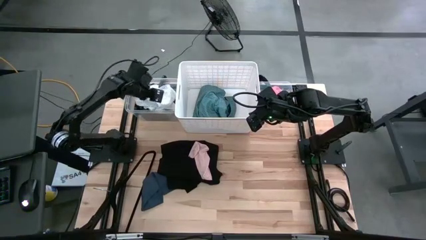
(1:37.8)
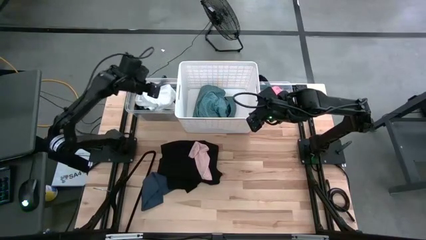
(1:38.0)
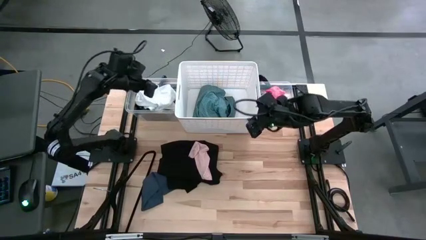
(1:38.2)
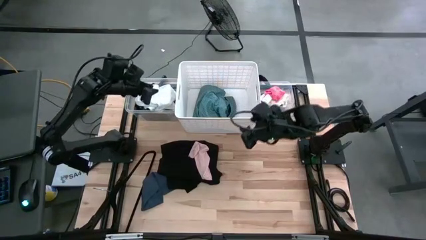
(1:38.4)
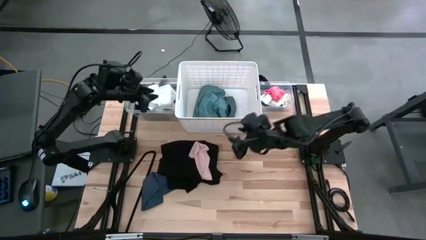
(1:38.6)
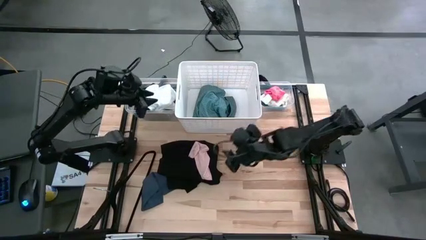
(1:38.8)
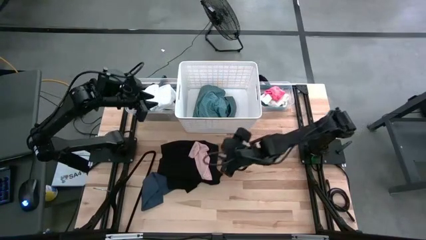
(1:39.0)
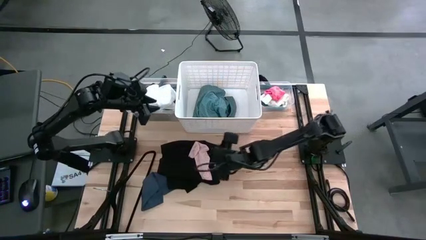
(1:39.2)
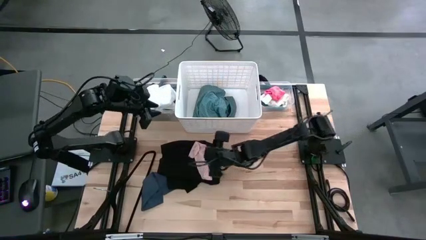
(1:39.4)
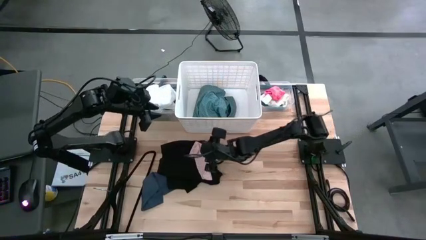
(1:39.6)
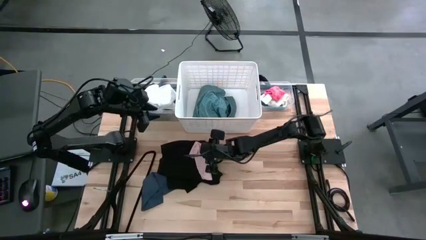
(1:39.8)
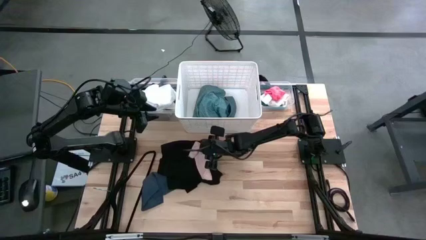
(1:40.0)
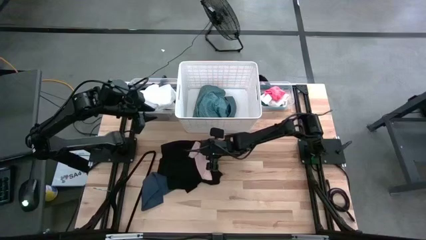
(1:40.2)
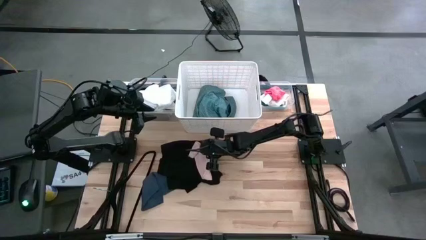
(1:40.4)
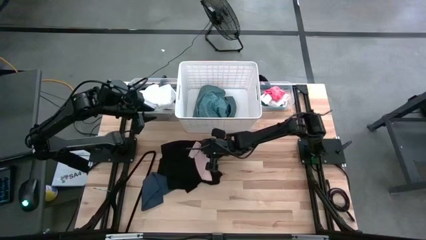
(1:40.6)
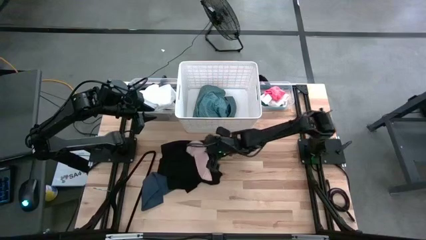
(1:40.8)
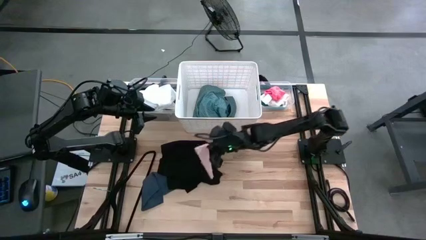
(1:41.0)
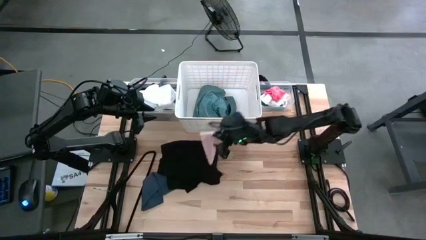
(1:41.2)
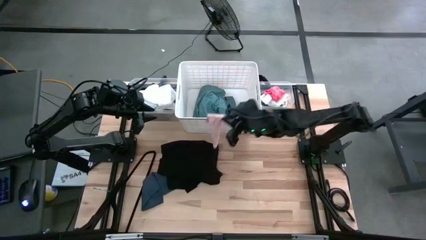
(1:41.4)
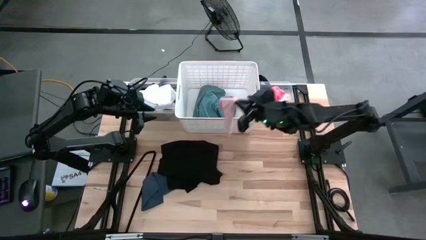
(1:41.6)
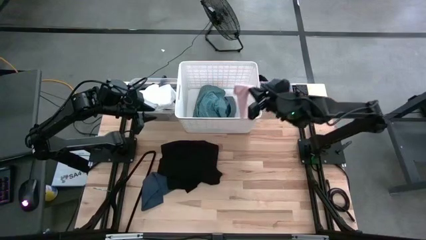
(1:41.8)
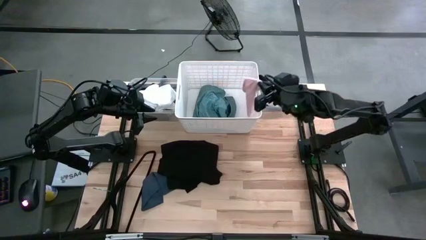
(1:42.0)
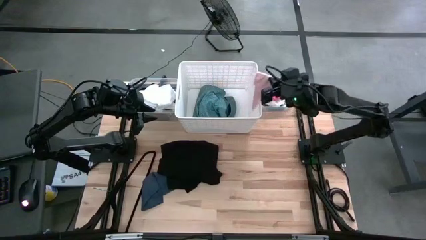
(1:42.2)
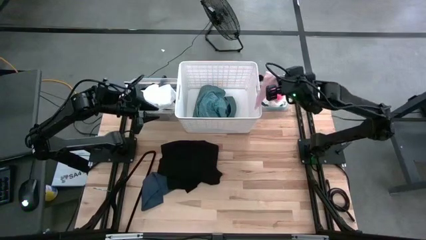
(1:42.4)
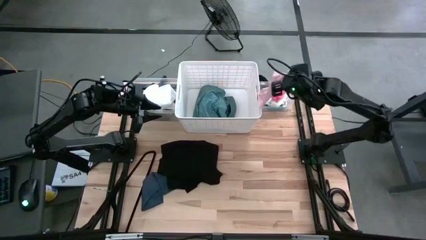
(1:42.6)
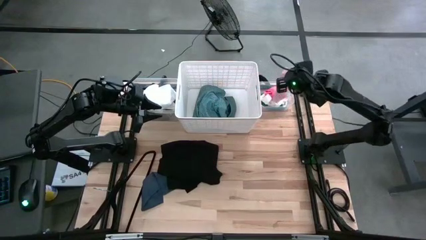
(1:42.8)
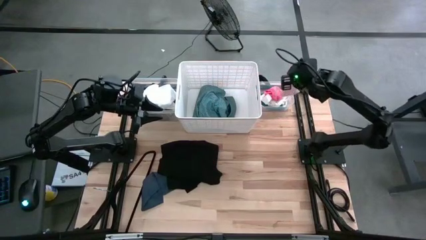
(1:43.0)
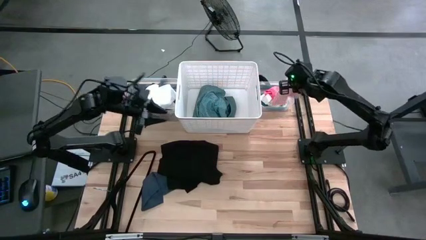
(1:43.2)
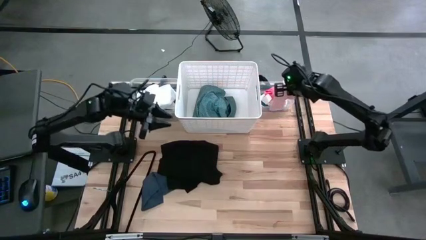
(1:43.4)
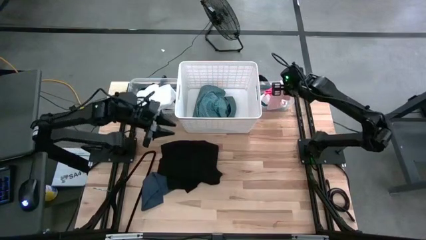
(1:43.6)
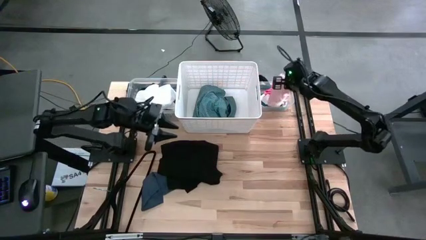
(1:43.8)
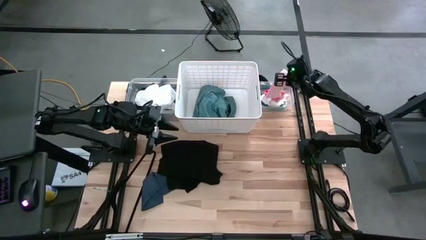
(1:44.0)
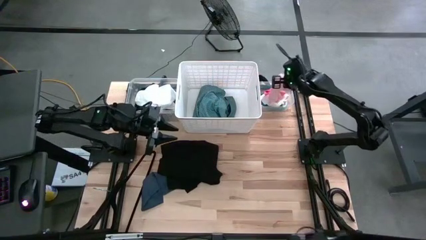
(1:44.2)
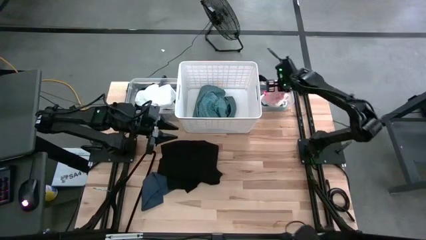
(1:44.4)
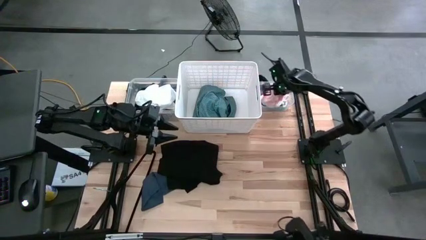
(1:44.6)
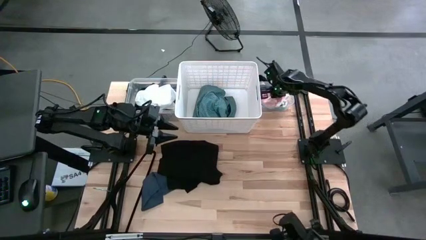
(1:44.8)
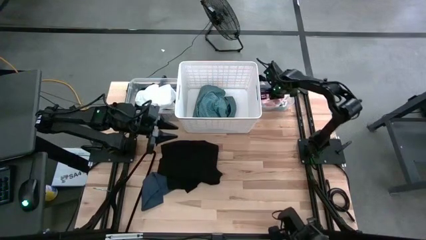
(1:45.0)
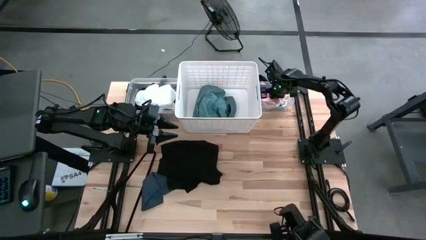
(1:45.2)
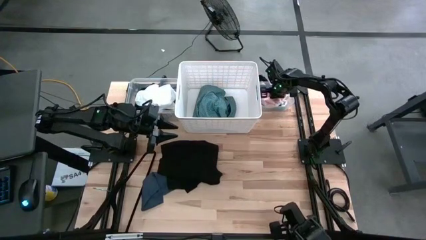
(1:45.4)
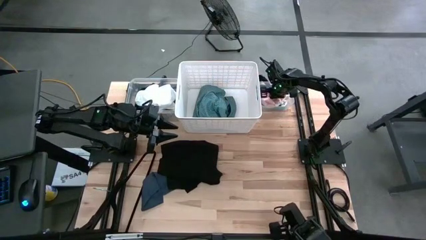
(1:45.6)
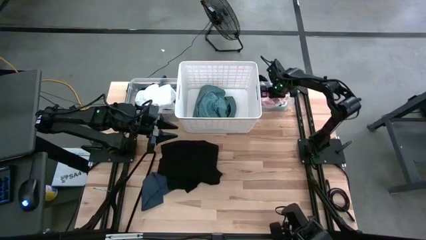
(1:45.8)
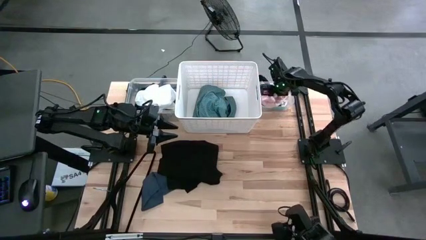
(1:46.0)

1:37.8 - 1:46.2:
Task: Pick & Place Cloths
Put the light pink sock into the right transparent bin

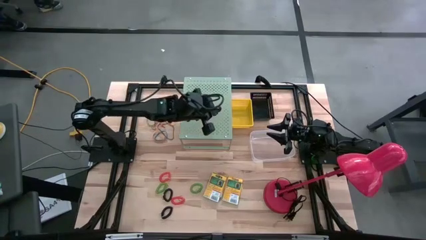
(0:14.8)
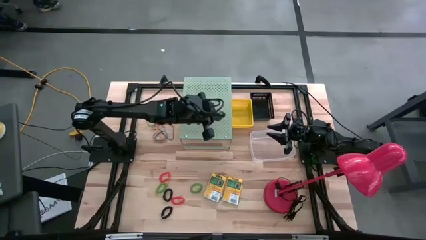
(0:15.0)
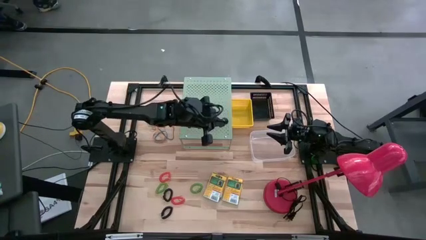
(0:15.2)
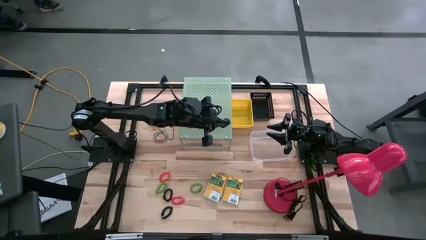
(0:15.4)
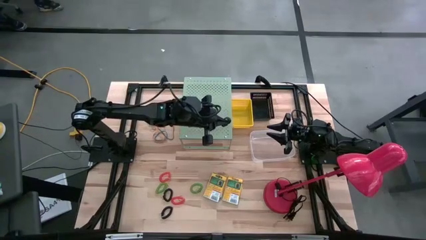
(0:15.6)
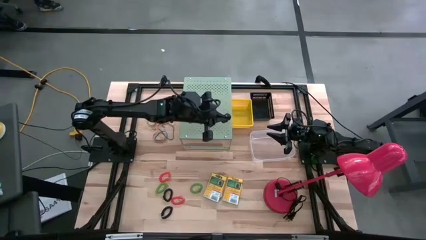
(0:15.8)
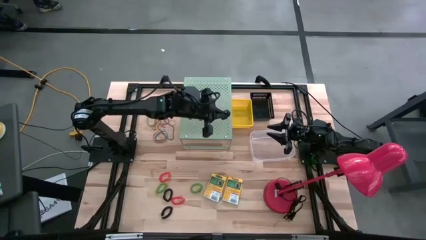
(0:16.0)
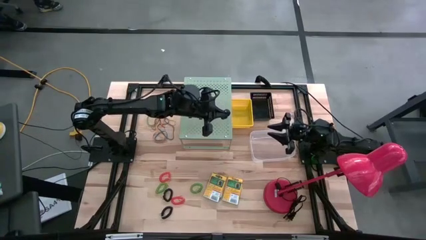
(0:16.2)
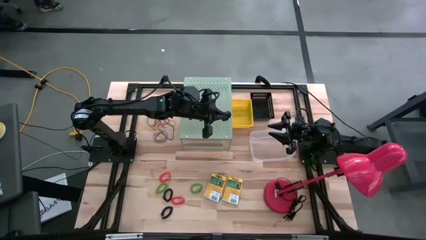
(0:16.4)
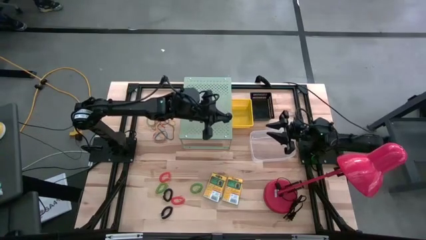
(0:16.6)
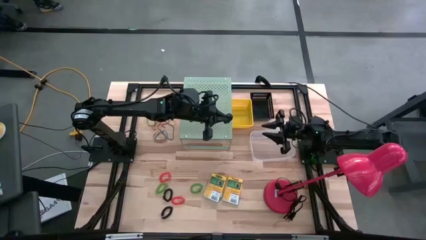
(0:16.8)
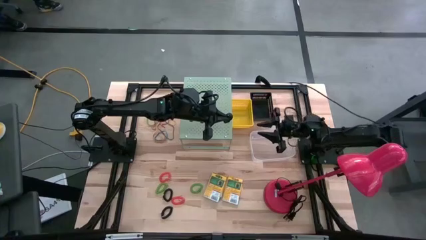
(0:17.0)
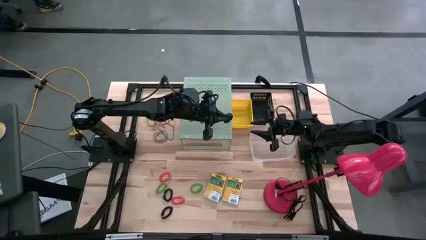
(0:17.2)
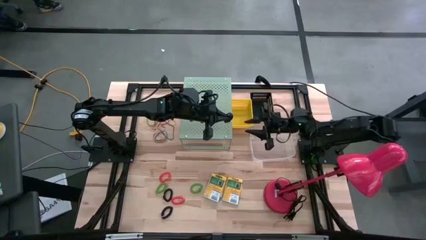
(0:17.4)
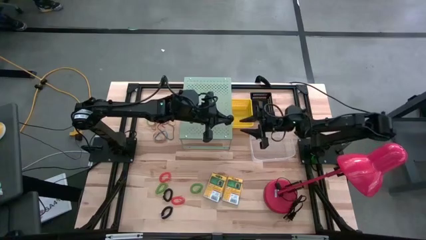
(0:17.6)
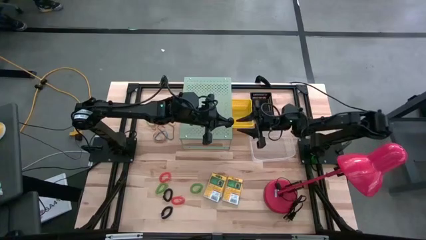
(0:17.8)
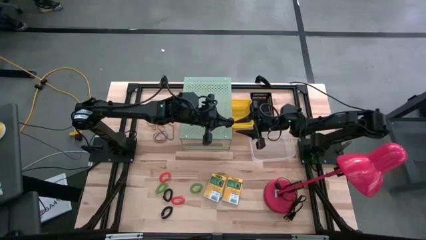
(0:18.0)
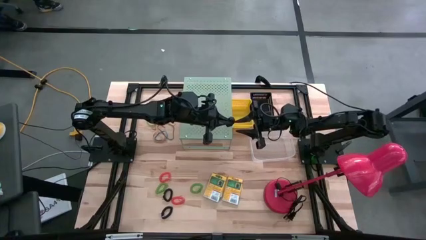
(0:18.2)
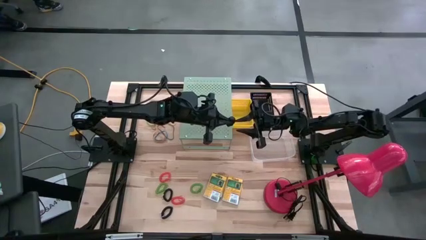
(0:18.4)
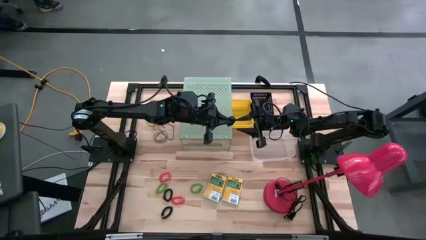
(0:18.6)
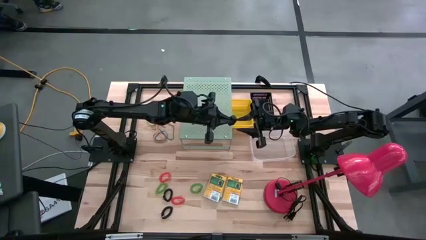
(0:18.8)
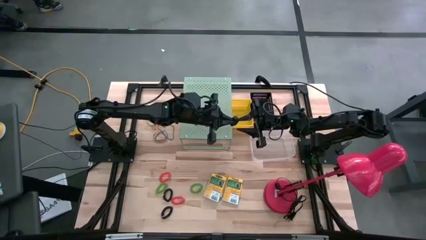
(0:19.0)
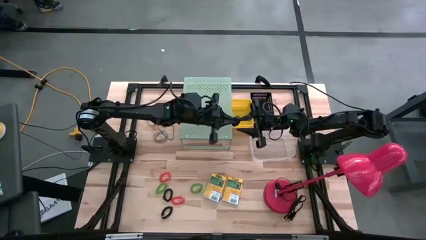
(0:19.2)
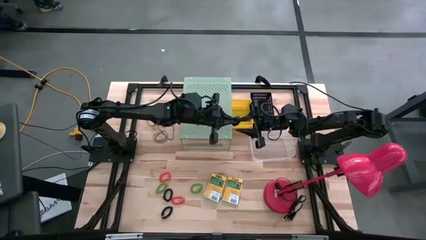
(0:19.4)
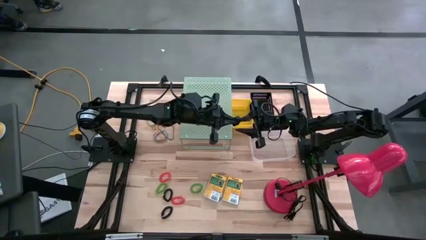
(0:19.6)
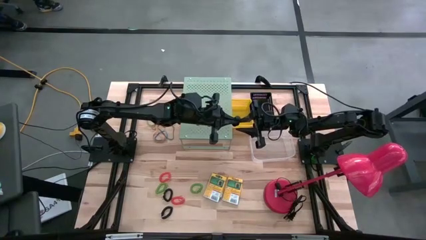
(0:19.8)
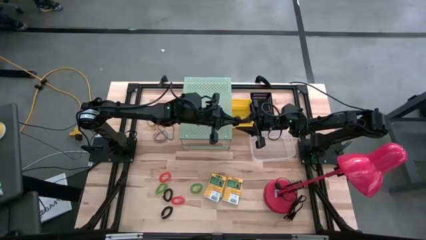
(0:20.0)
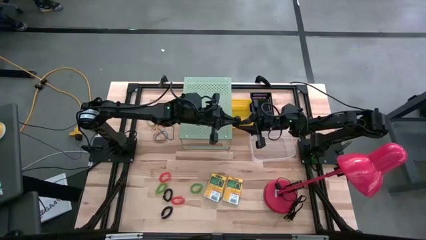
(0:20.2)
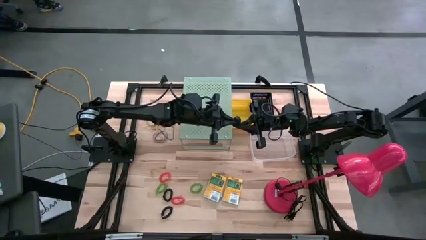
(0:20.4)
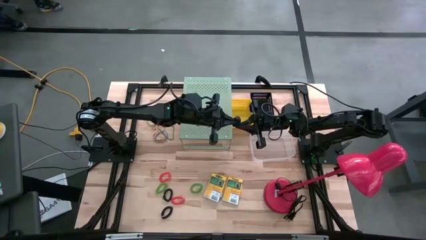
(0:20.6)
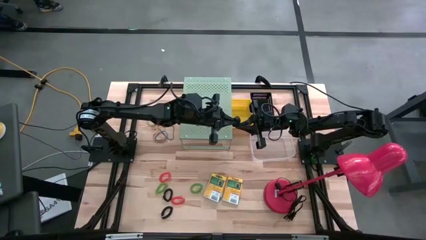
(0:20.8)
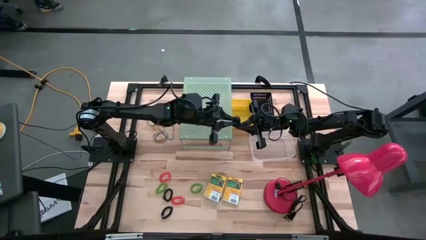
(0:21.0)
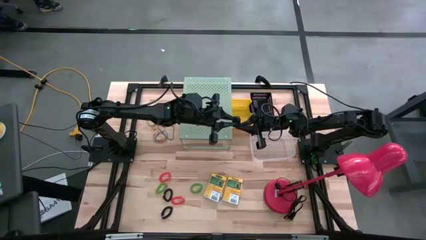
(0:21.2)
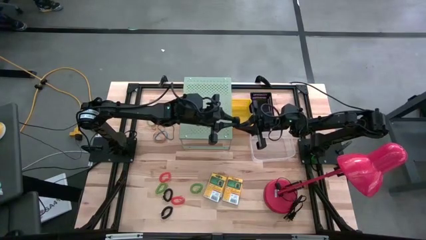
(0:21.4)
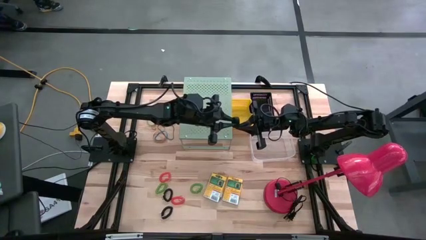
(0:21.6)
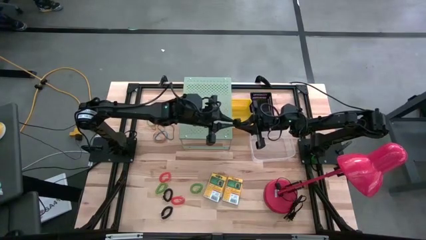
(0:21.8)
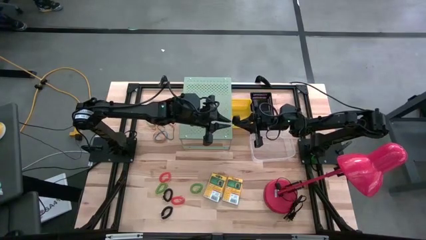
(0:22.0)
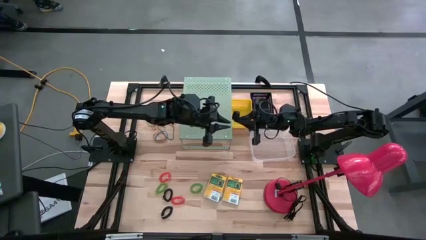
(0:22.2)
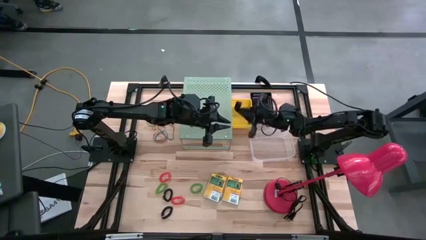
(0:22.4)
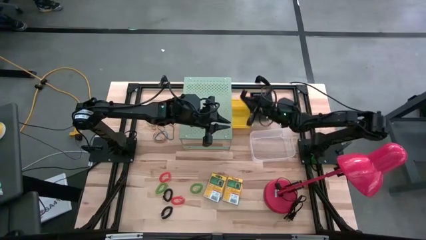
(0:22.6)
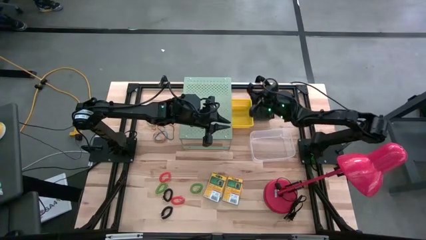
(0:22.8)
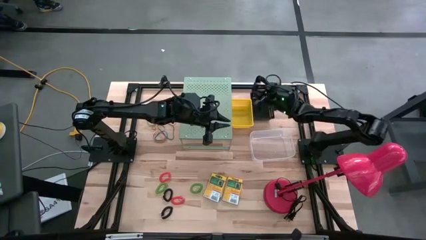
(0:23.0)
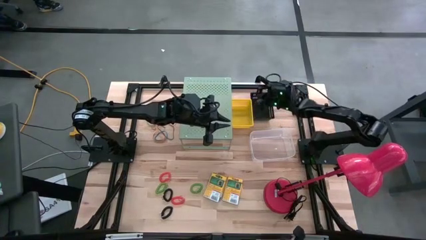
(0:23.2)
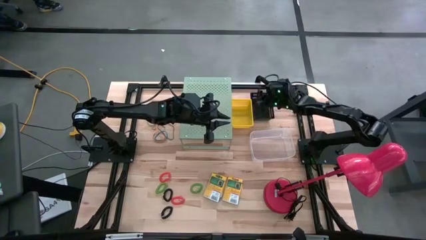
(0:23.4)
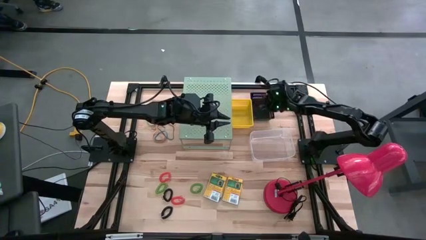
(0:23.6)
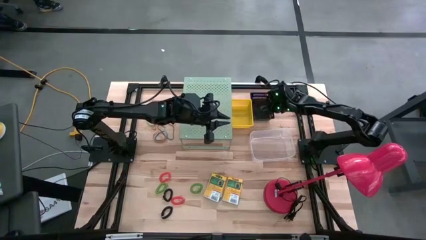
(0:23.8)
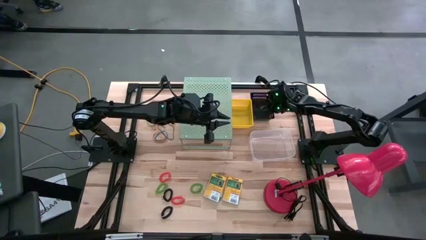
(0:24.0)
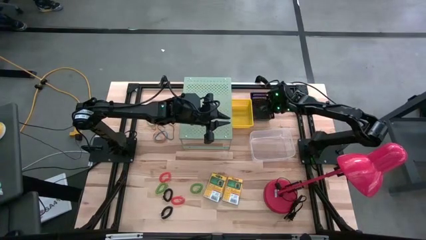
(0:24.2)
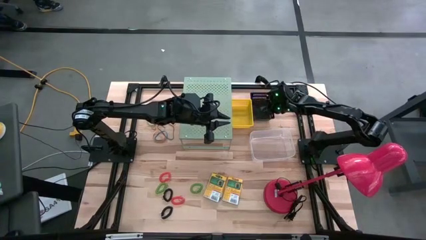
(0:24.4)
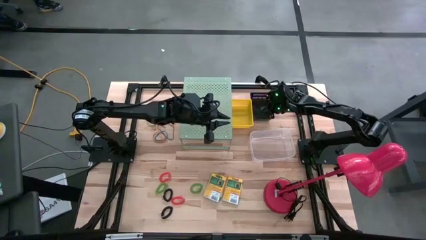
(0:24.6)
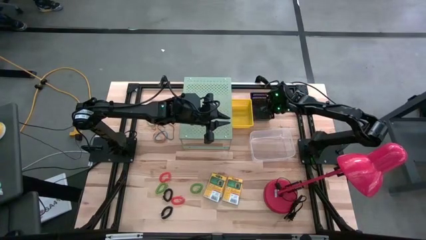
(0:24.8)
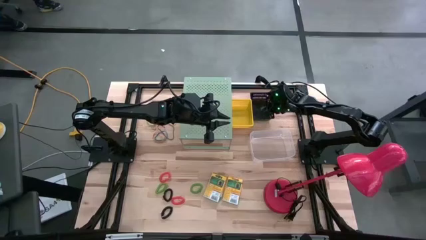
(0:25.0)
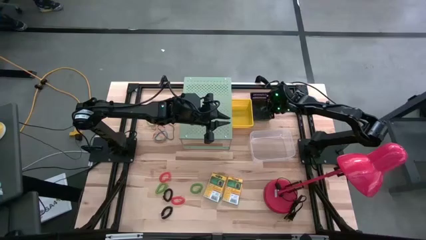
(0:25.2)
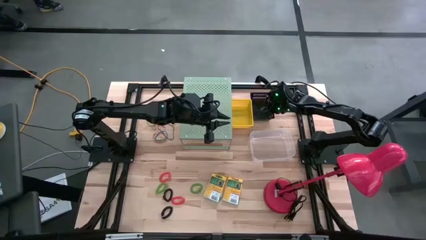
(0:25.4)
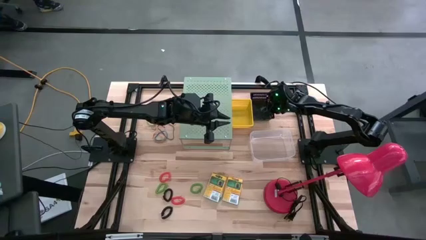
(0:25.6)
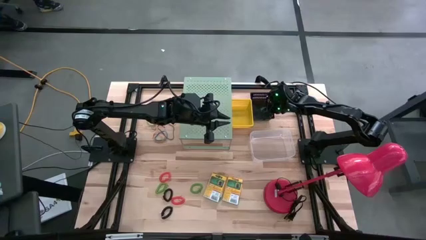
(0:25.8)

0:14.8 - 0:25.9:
Task: Pick & Place Office Desk Supplies
Put the black rubber band into the black bin
